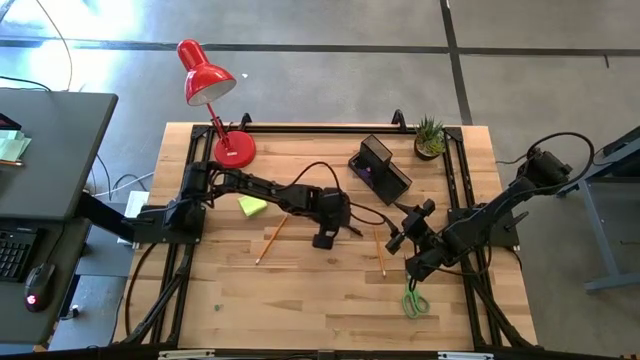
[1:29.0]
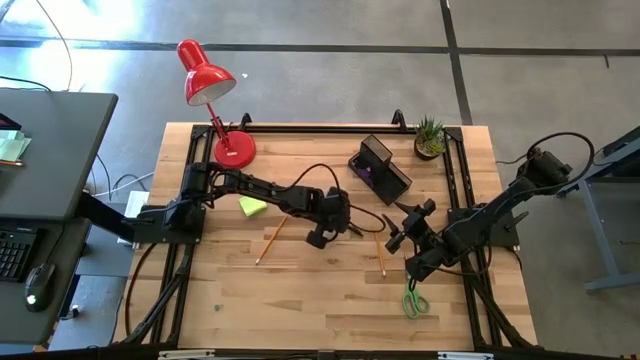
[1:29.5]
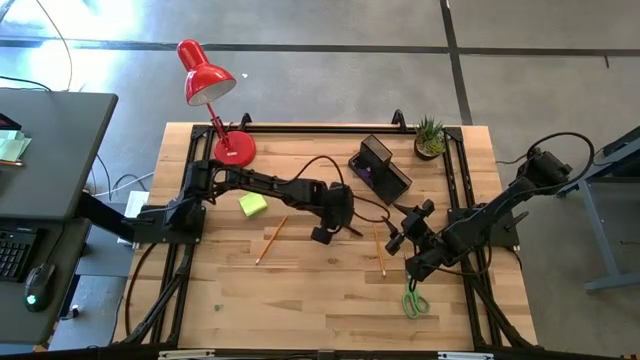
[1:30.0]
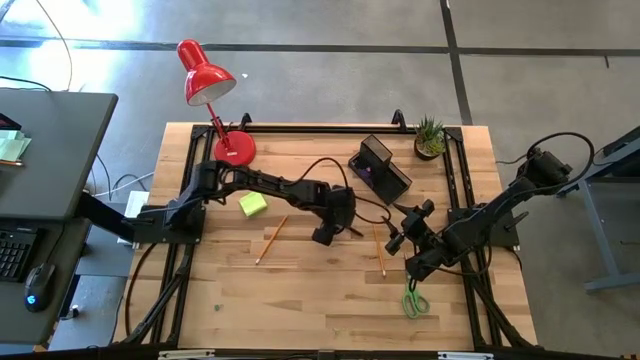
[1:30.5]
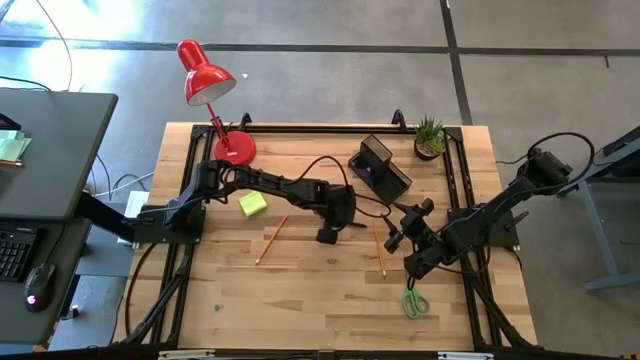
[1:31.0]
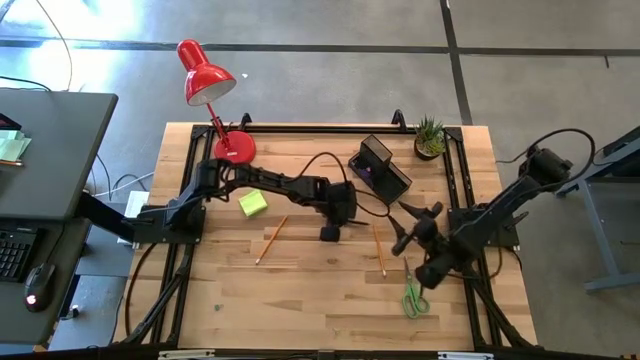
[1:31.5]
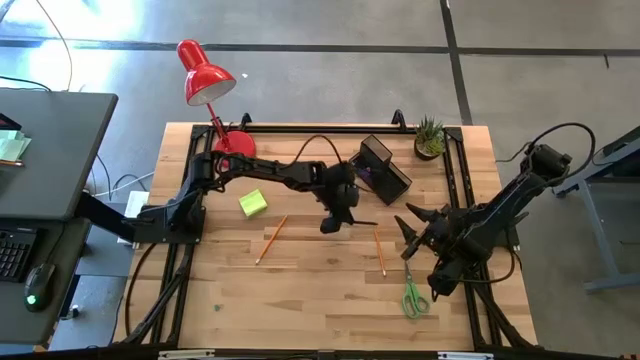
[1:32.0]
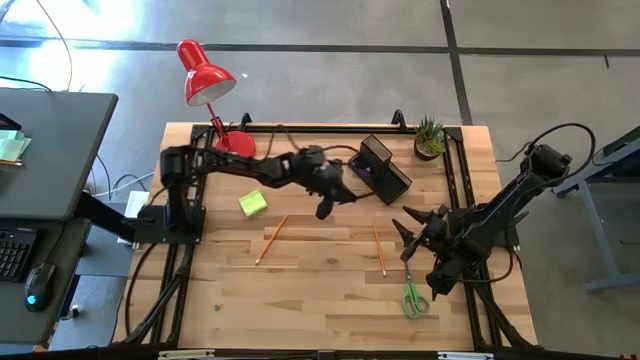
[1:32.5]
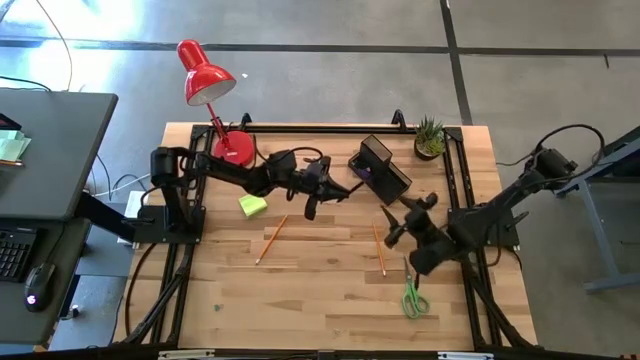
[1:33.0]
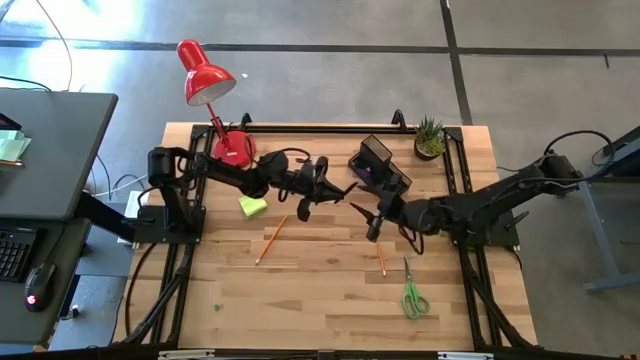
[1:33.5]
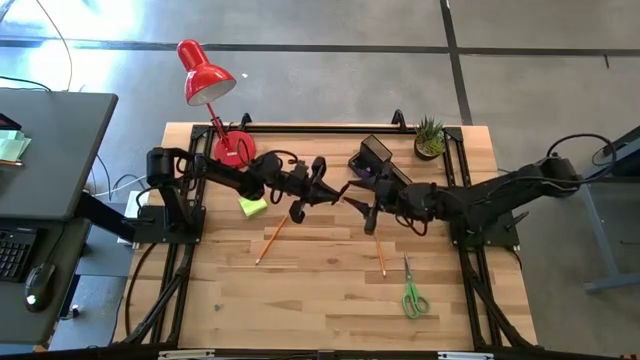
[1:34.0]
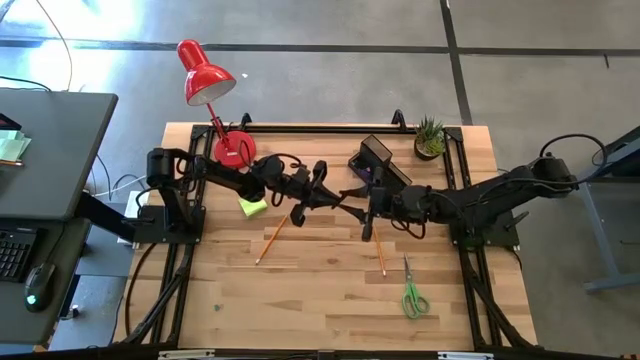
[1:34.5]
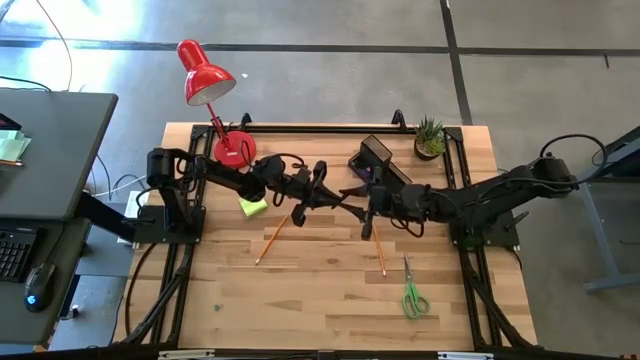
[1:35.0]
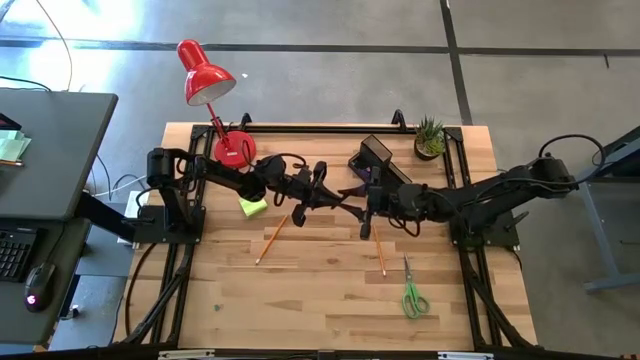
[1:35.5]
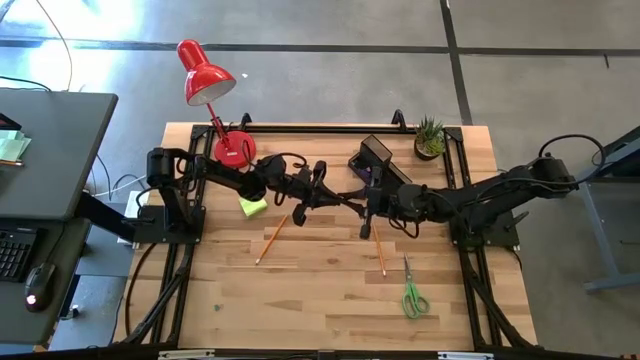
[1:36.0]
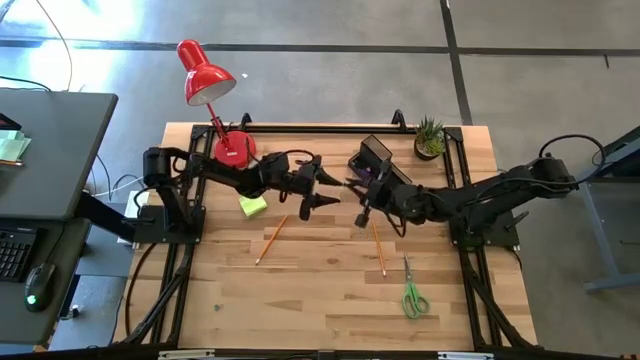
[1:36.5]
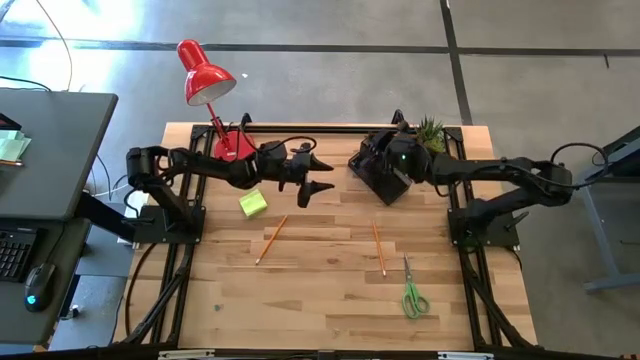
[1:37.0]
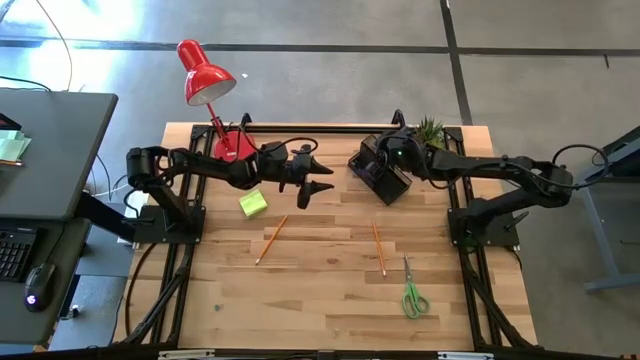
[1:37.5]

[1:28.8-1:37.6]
Task: Pick and place office supplies into organizer
Put the black pen into the black desk organizer

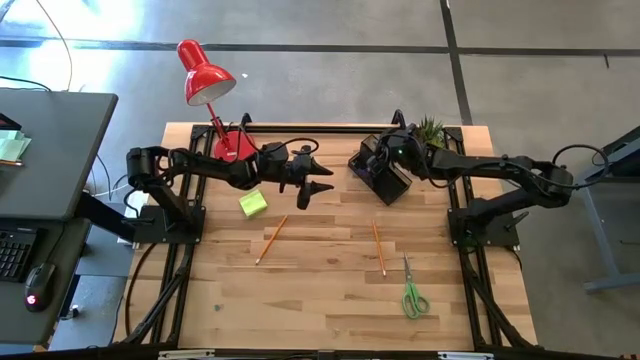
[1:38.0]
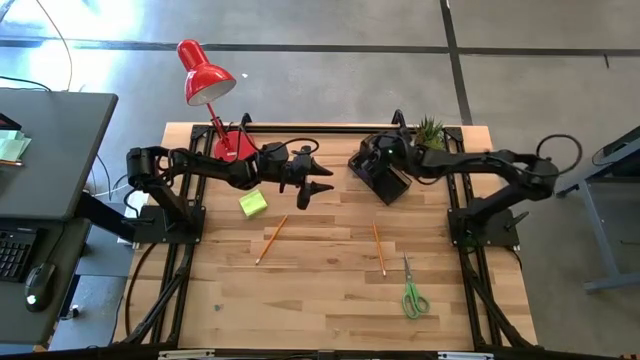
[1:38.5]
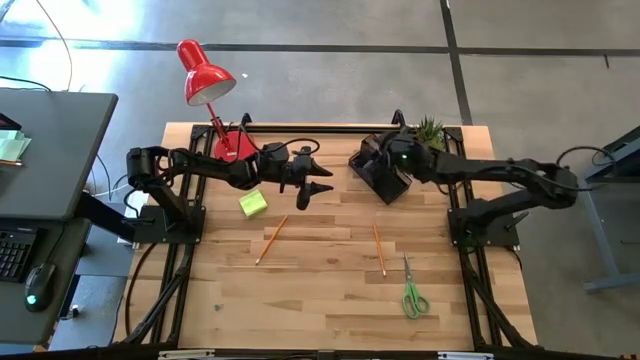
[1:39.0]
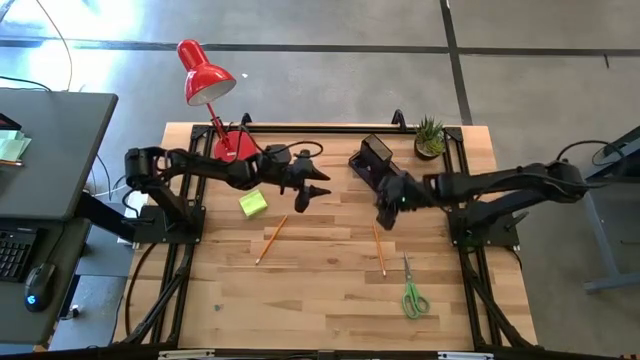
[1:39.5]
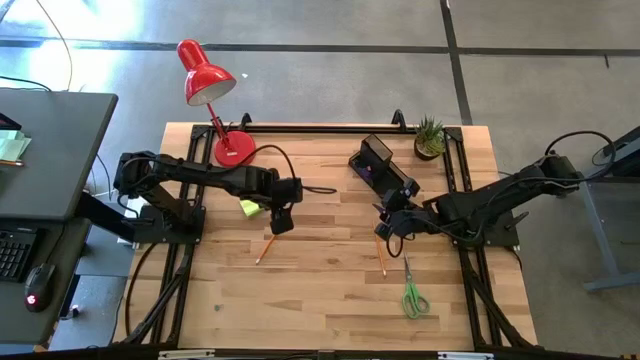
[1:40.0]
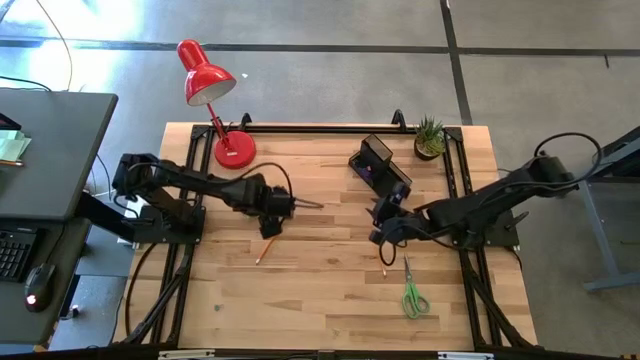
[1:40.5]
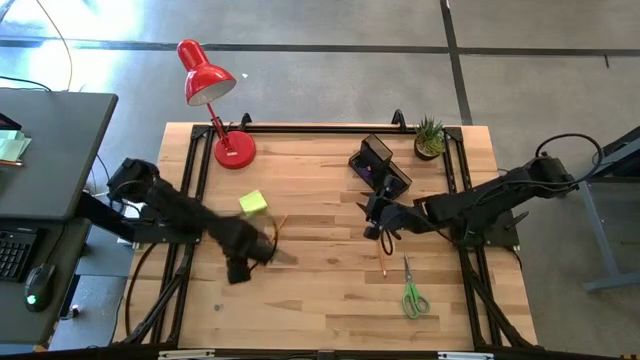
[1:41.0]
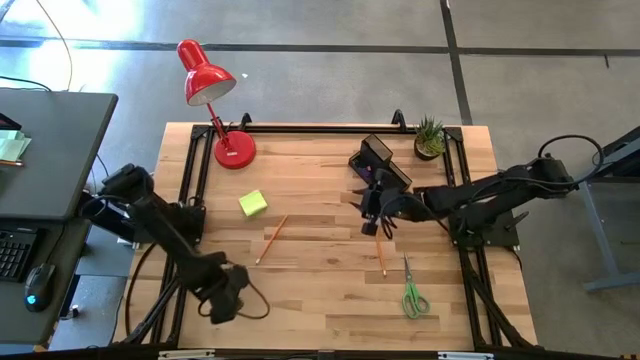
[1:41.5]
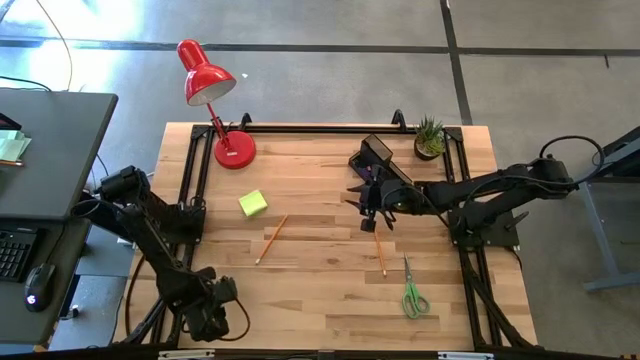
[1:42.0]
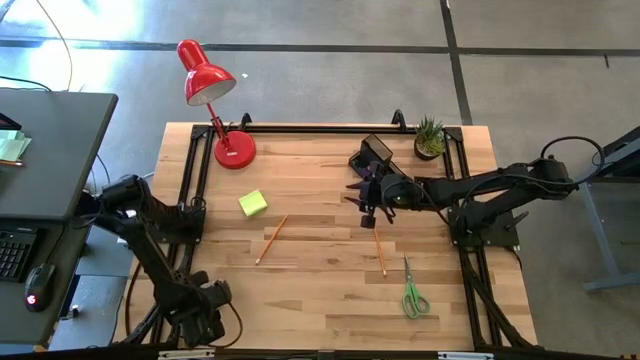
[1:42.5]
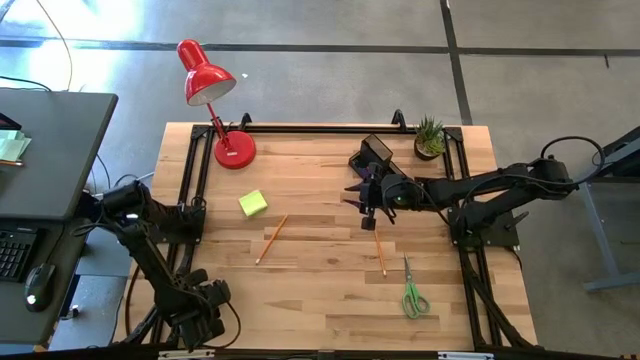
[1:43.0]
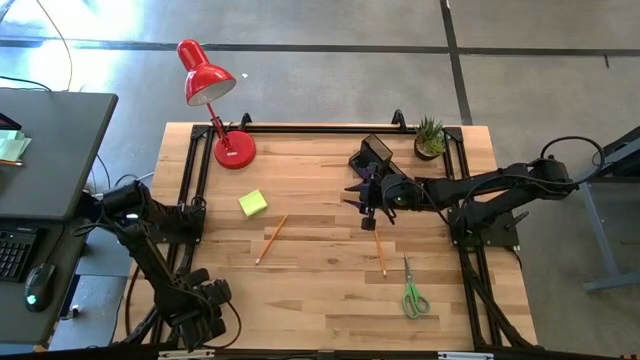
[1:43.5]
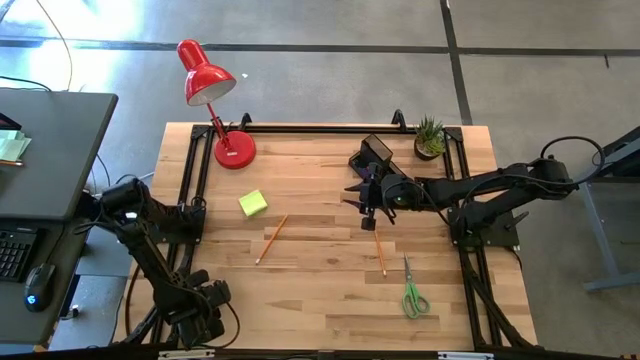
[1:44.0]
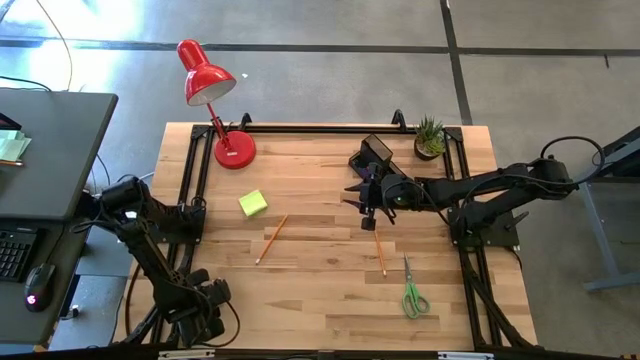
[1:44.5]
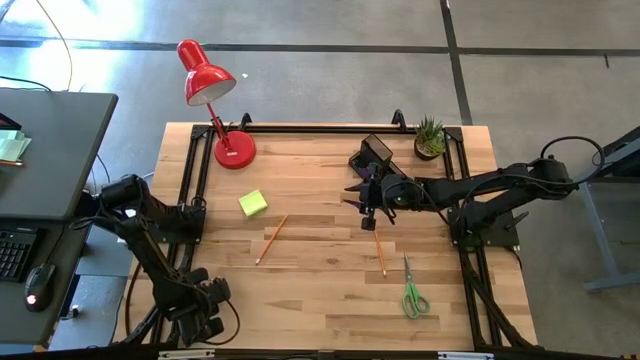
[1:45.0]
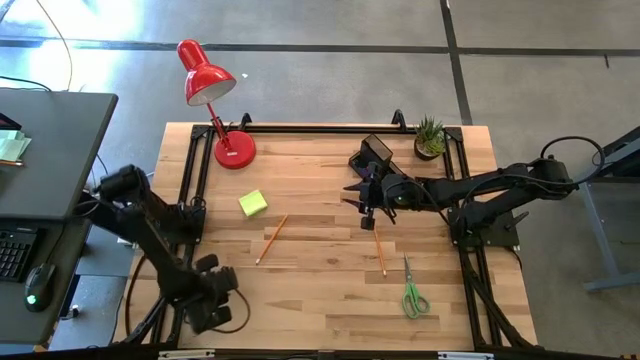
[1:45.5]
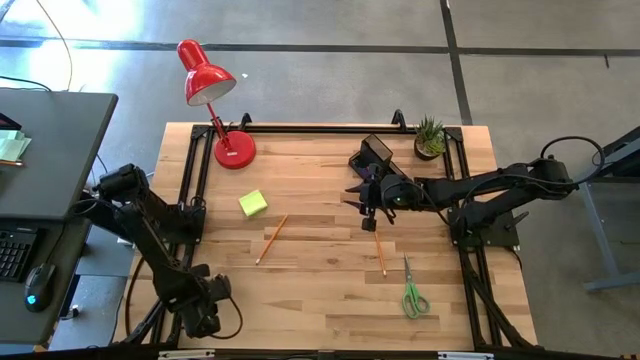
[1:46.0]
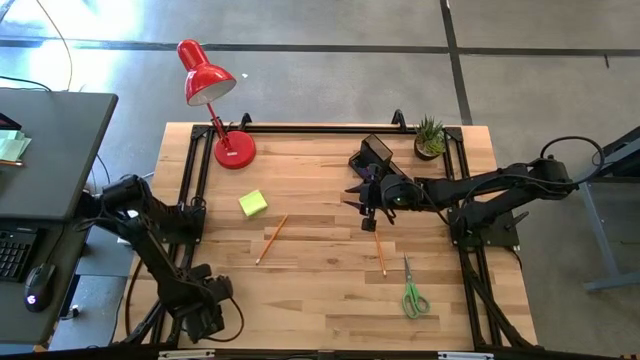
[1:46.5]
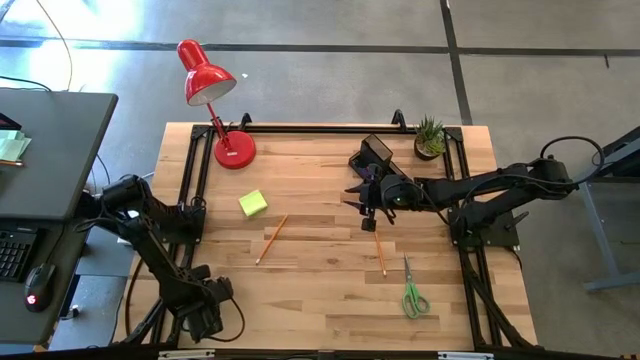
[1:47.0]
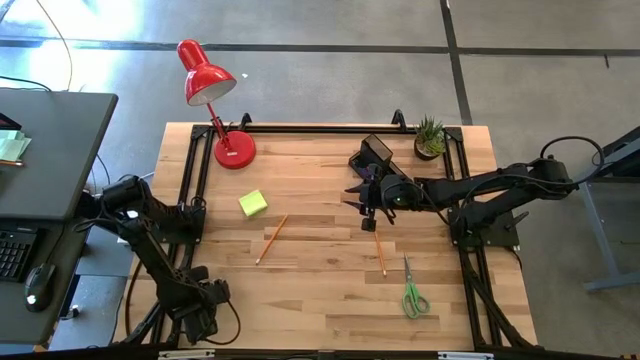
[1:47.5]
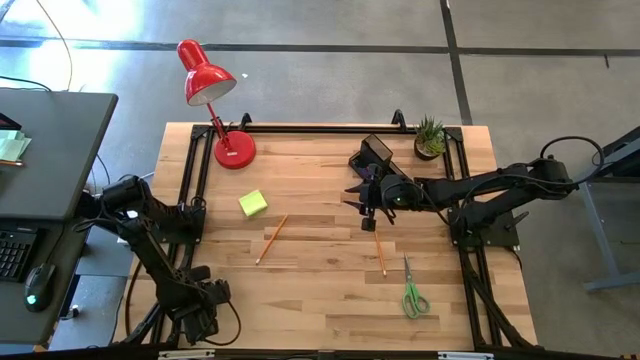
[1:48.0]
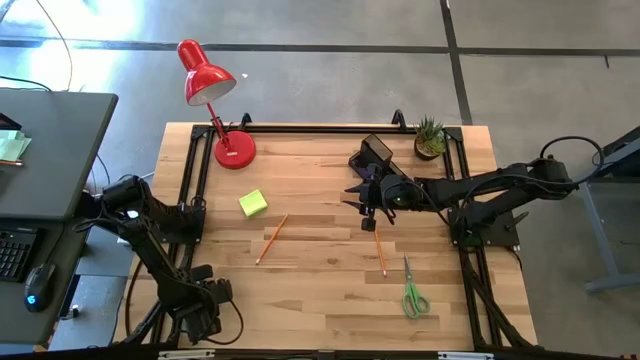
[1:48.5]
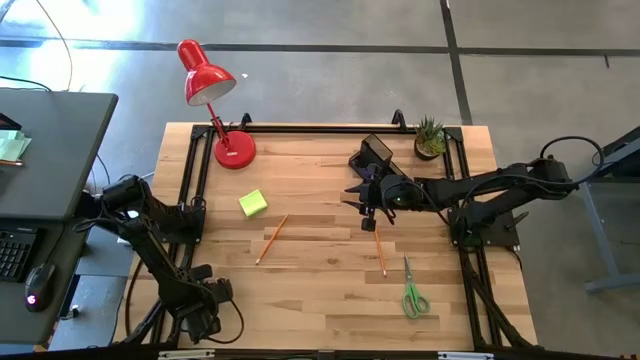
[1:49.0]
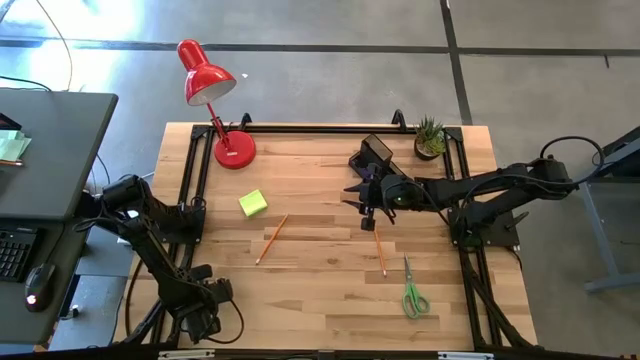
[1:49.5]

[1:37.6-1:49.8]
Put the blue binder clip into the black desk organizer

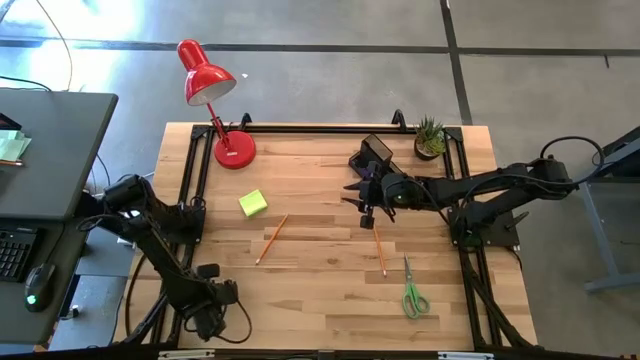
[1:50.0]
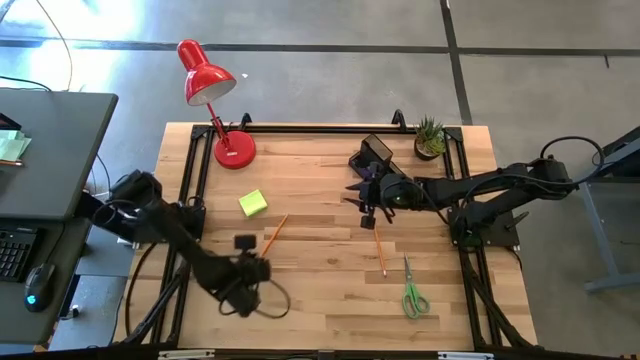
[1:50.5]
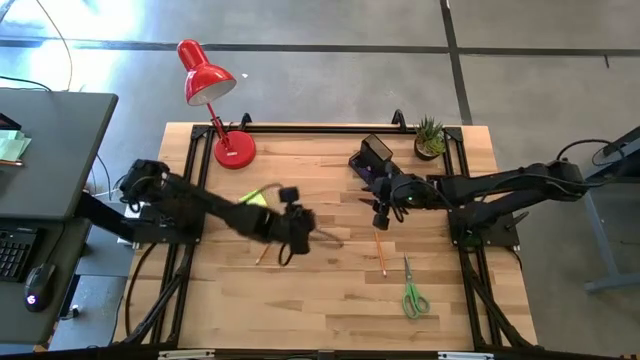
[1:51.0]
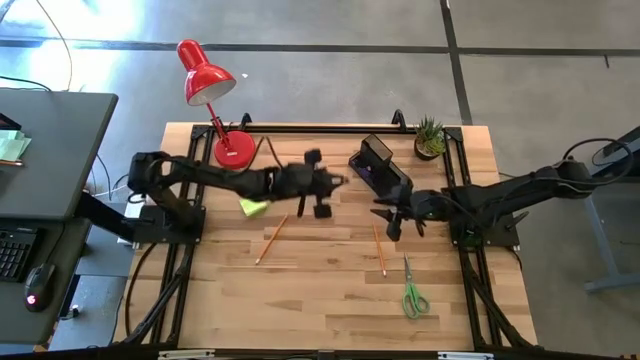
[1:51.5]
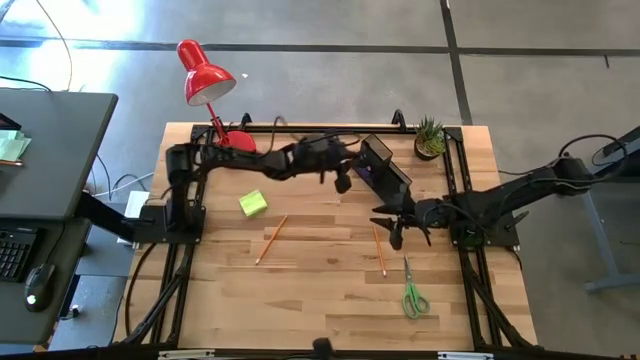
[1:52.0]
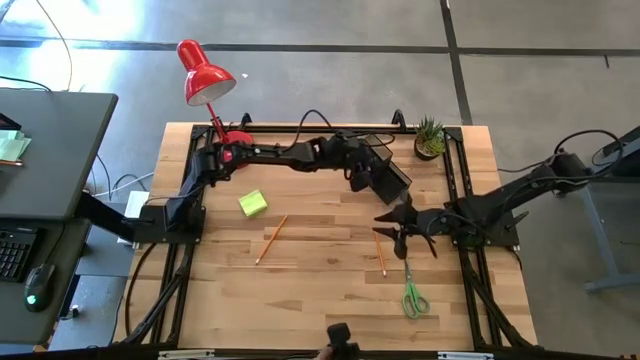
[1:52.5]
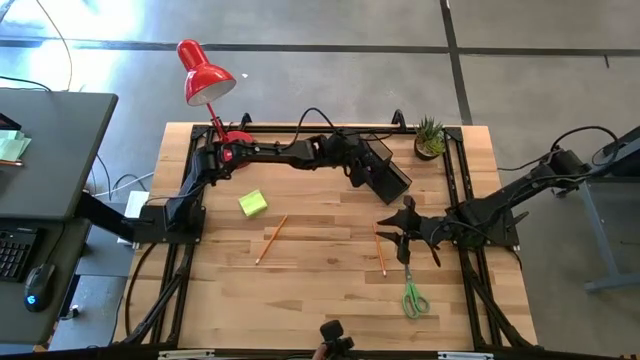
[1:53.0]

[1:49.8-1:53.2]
Put the blue binder clip into the black desk organizer
